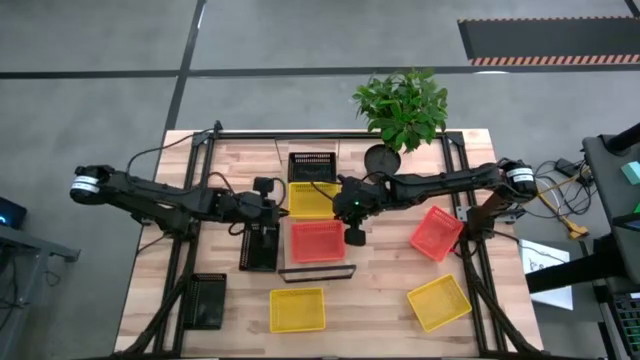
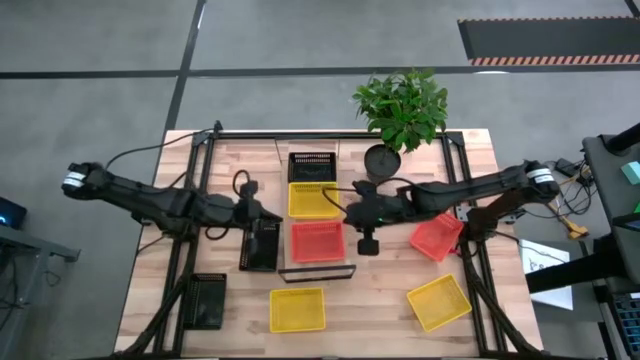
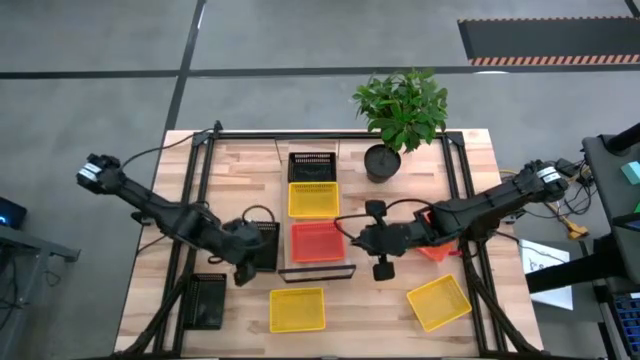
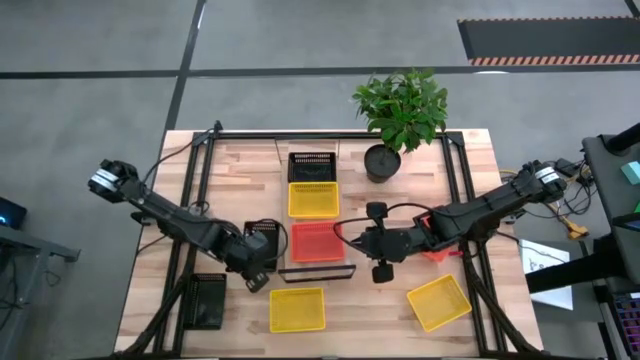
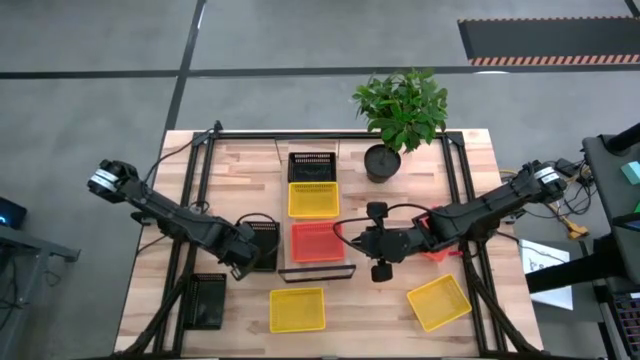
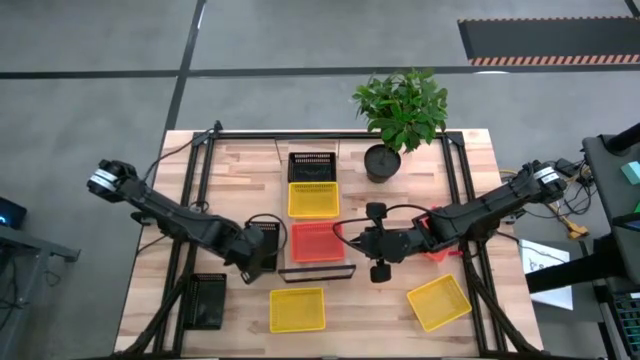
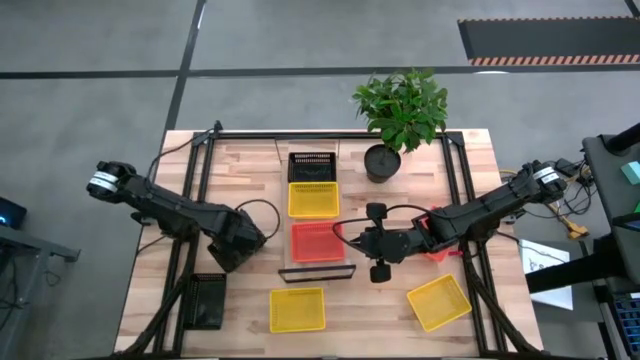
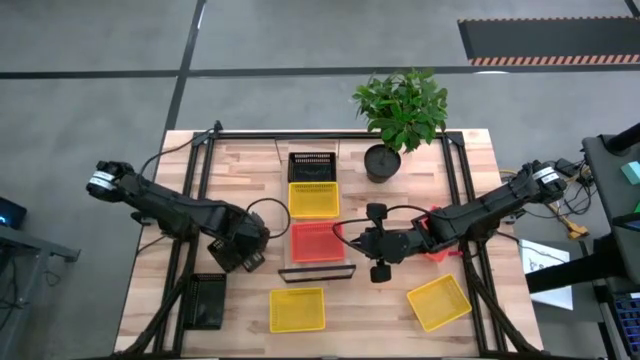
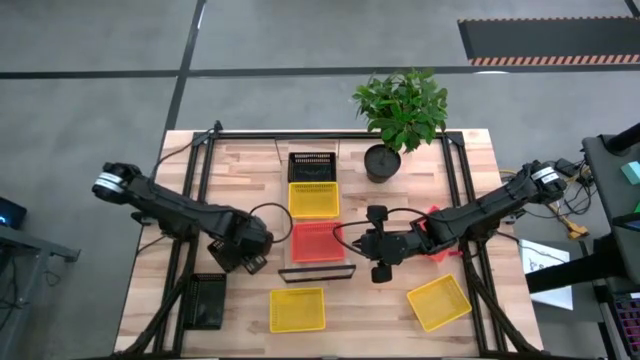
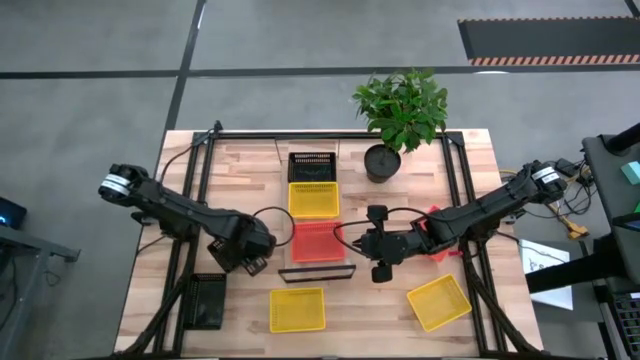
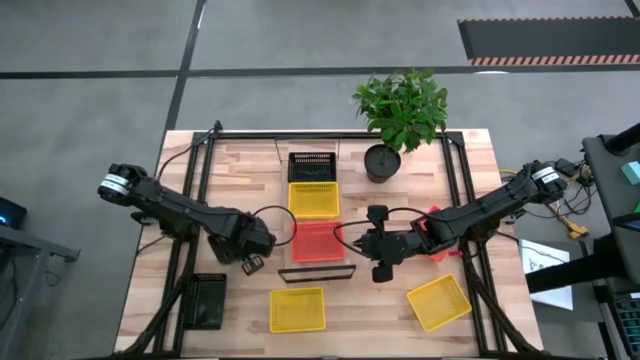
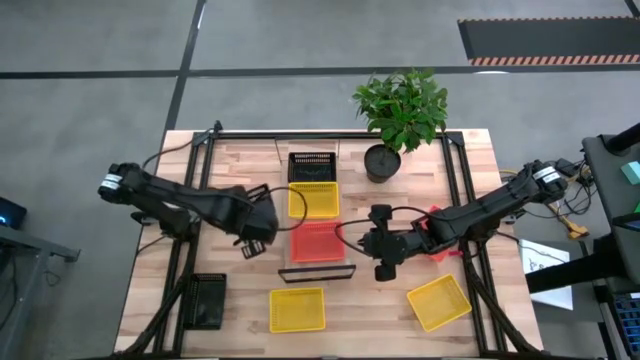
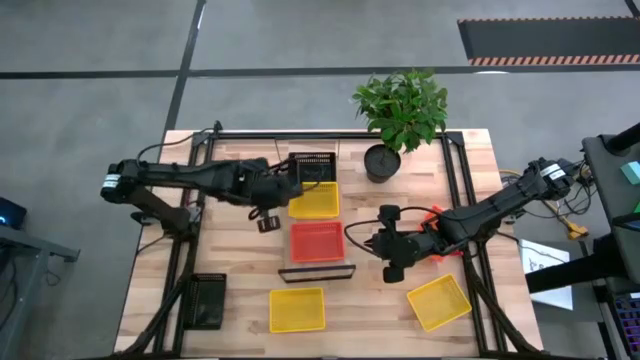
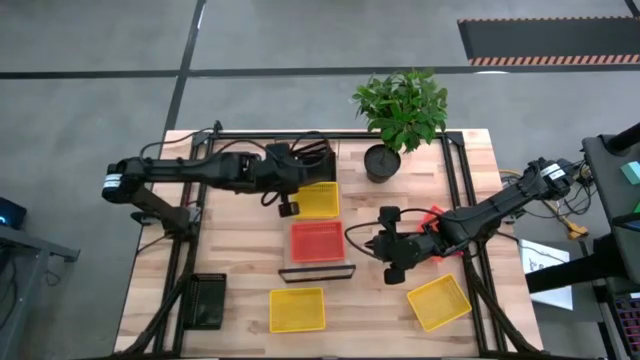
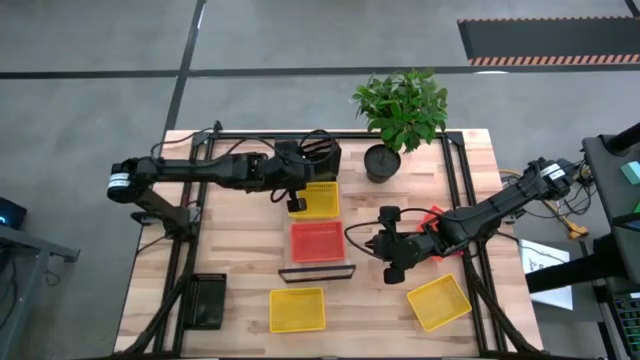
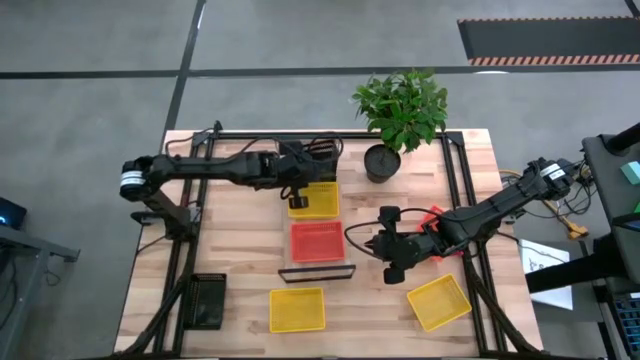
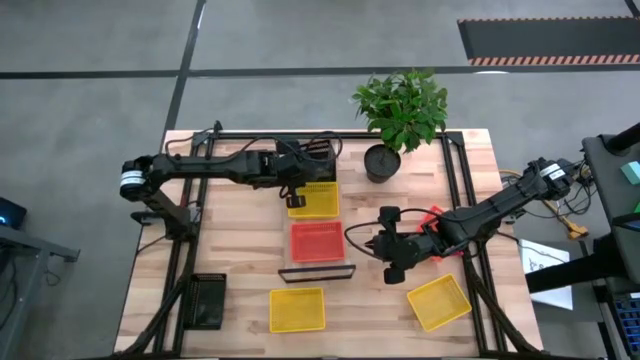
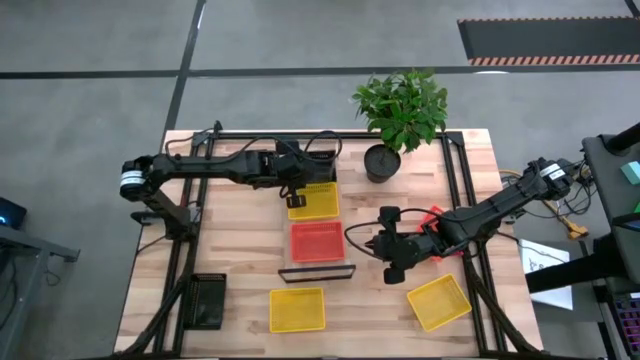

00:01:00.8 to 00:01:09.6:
Task: Stack baskets on shelf by color
Stack the top black bin on top of the other black bin on the shelf

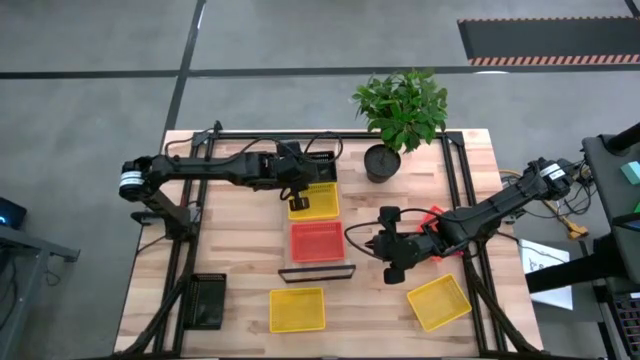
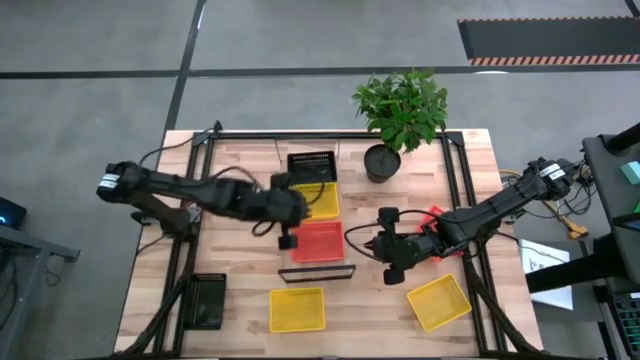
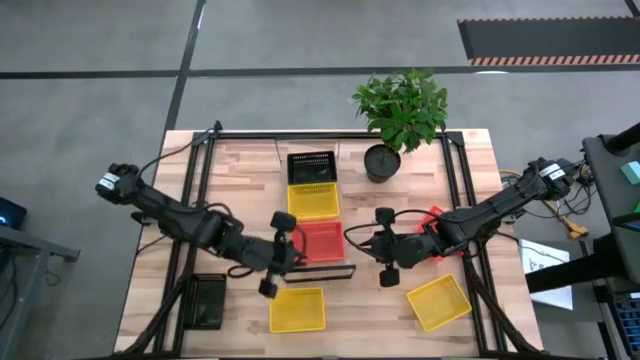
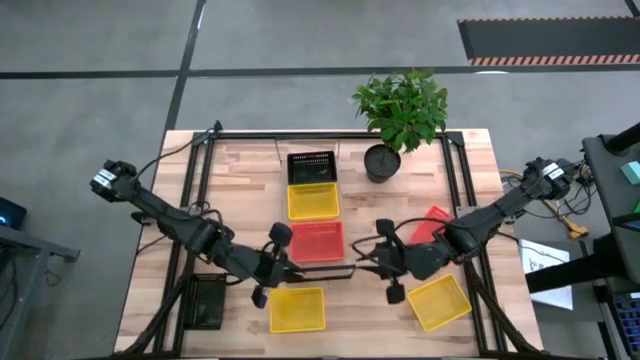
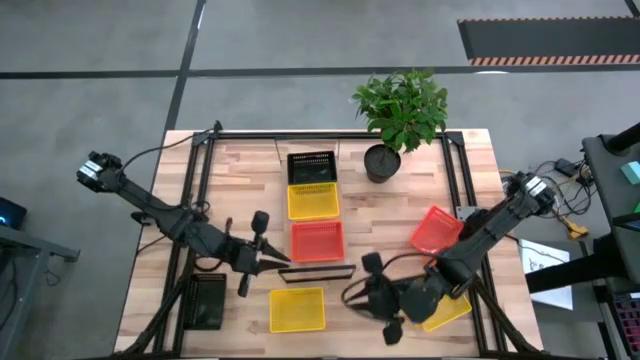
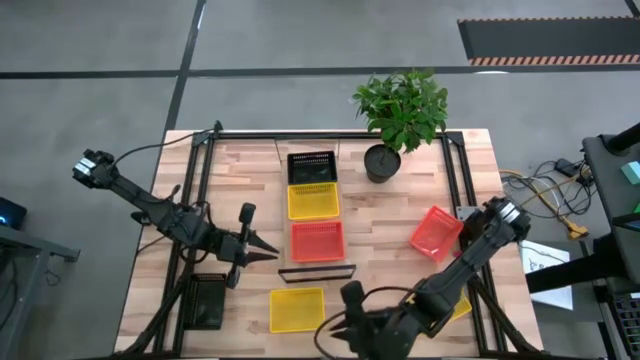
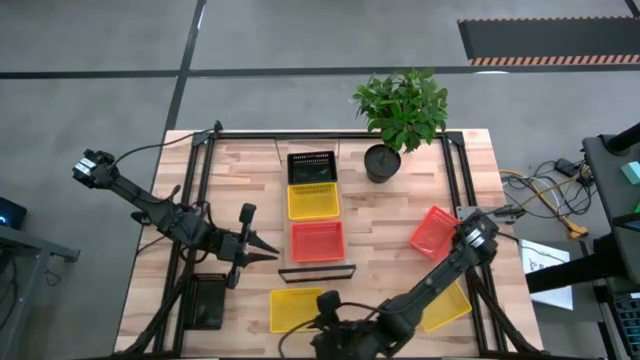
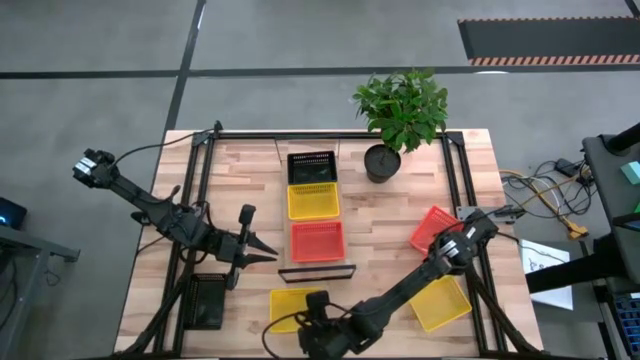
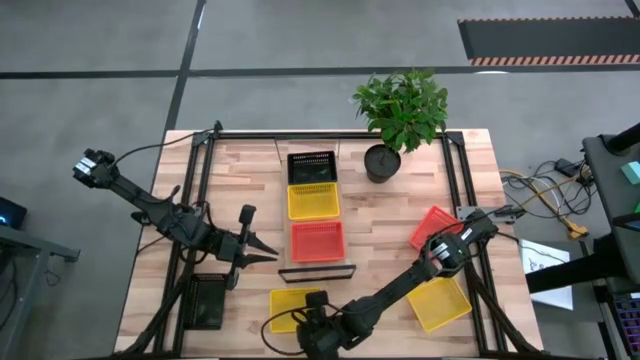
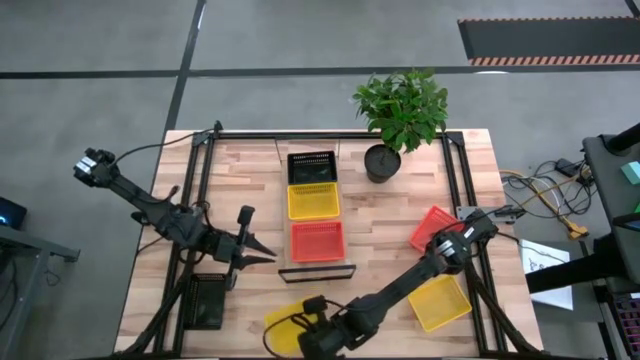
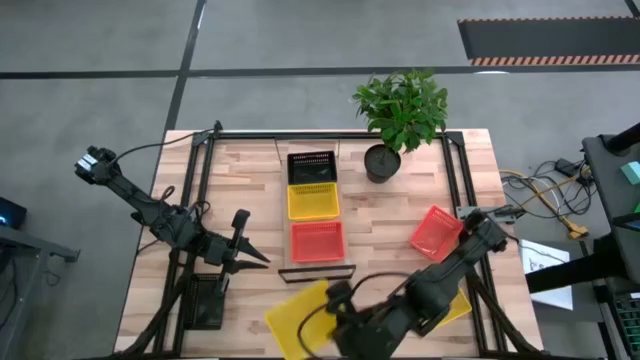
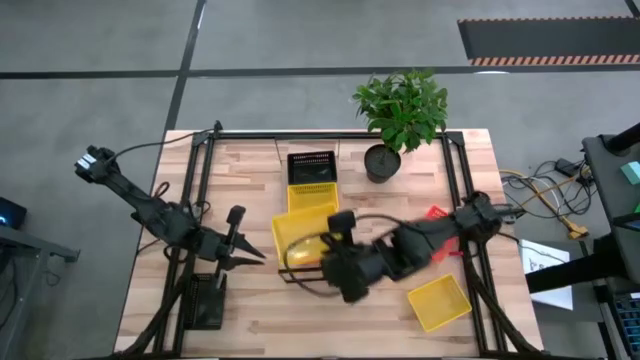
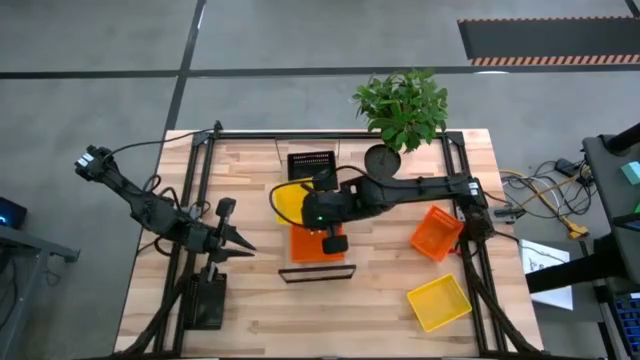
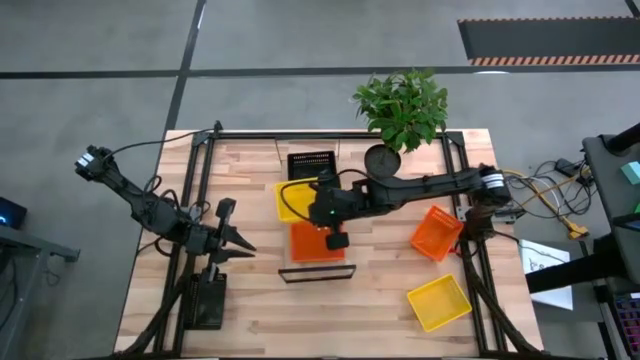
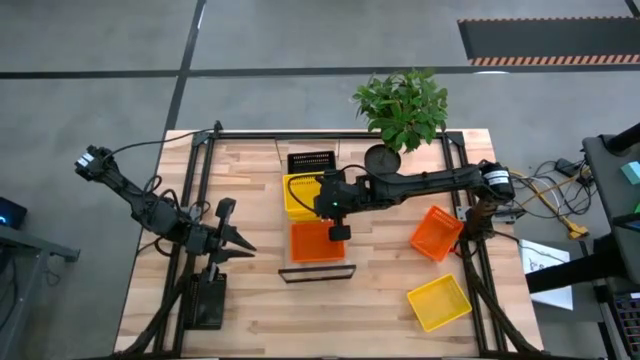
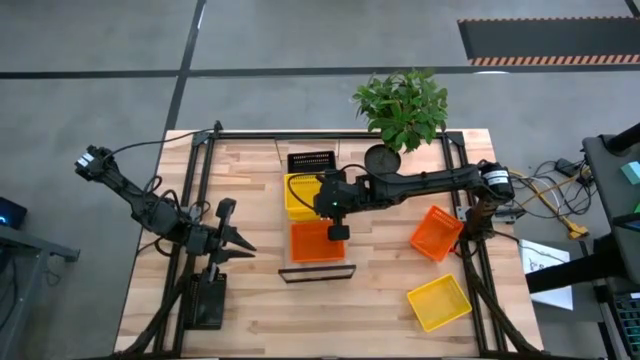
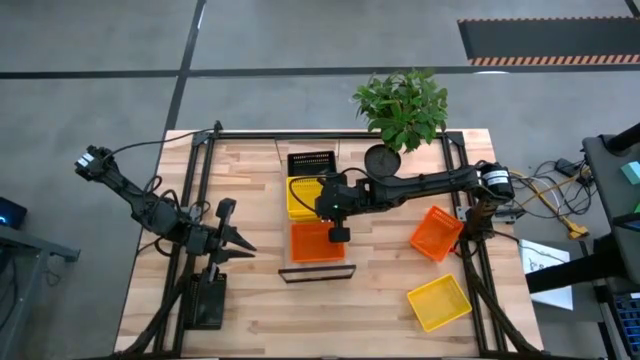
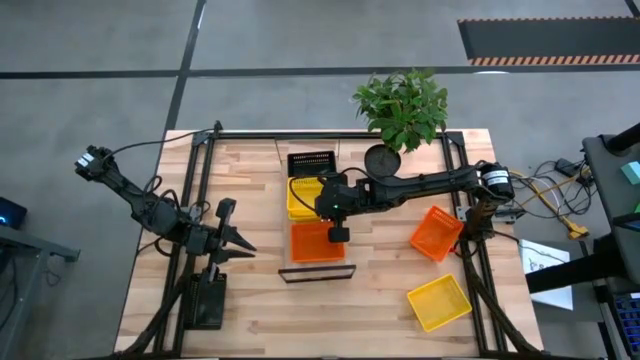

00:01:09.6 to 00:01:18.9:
Stack the left yellow bin into the yellow bin on the shelf

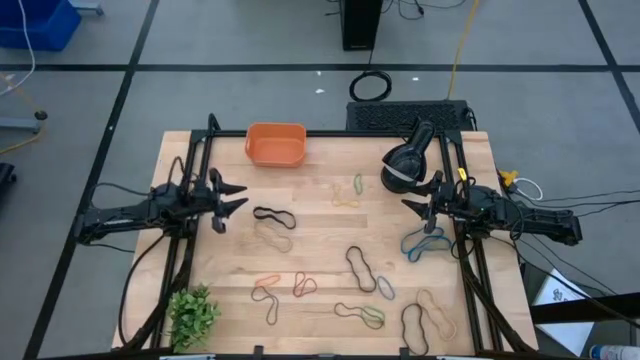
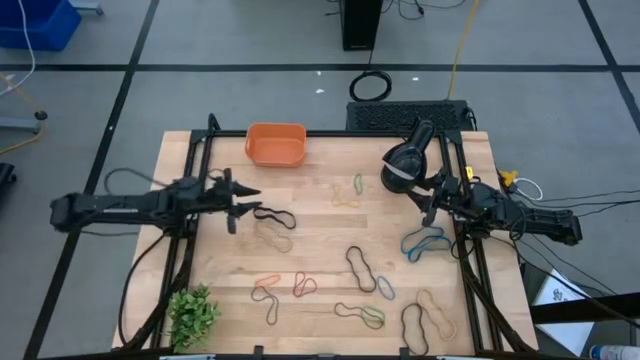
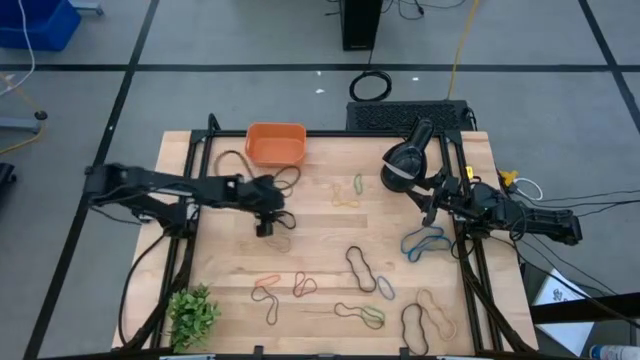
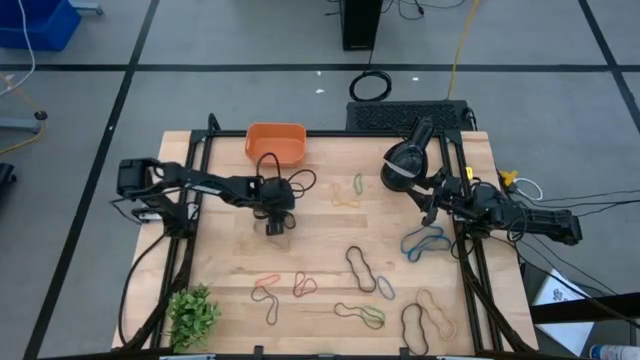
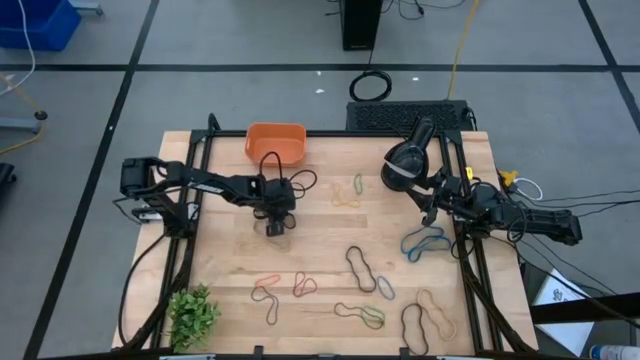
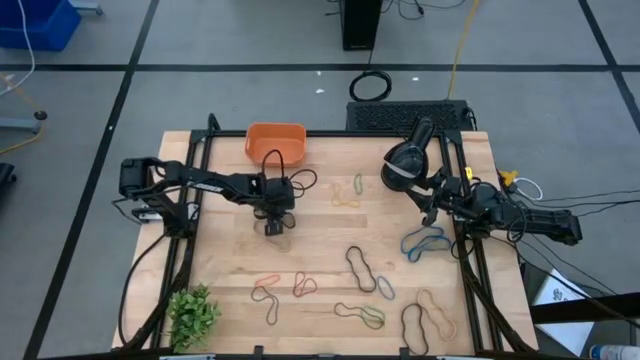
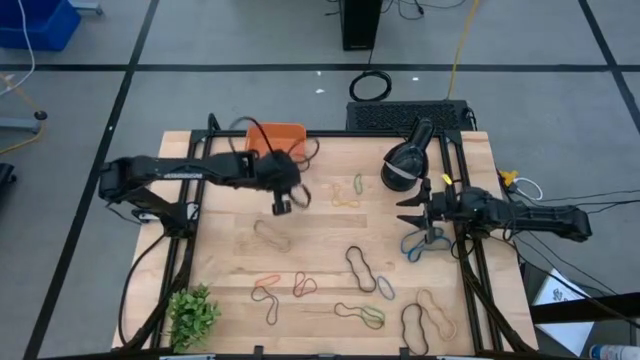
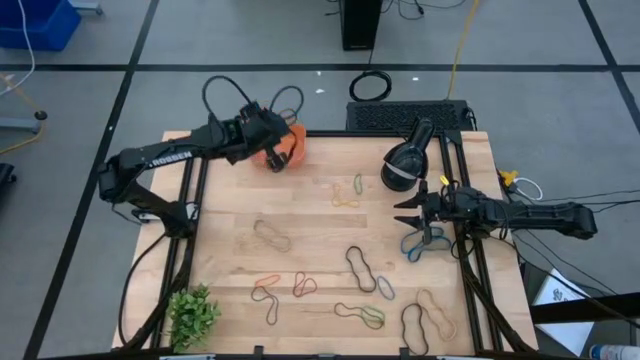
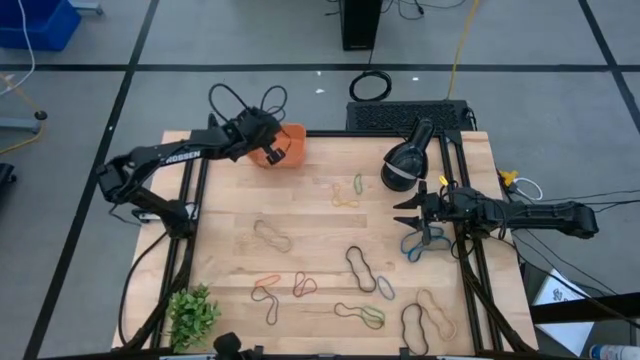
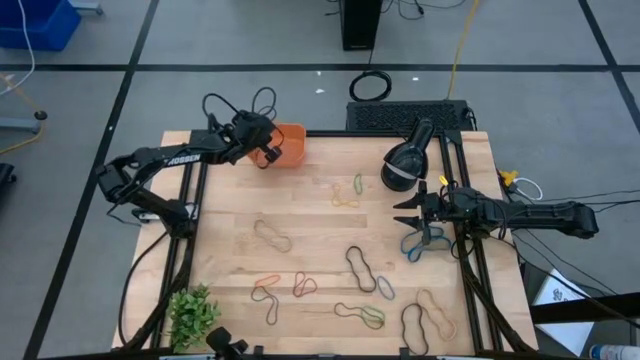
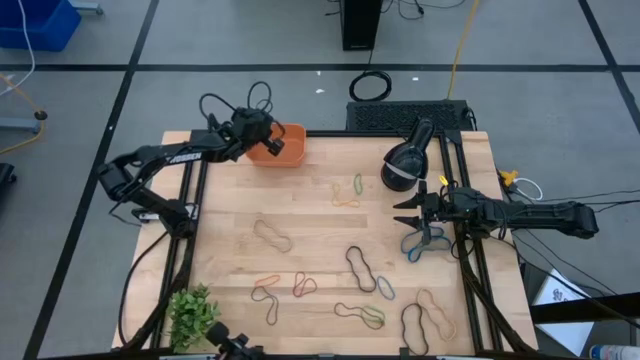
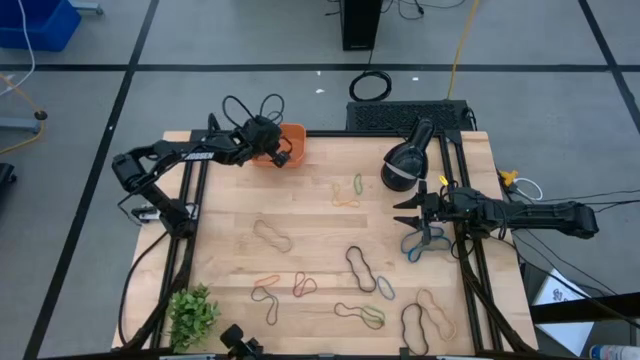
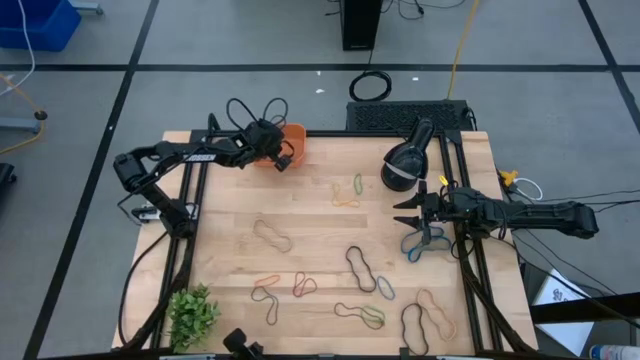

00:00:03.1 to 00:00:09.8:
Task: Pick and place rubber bands into bin
Put the top black rubber band into the orange container
